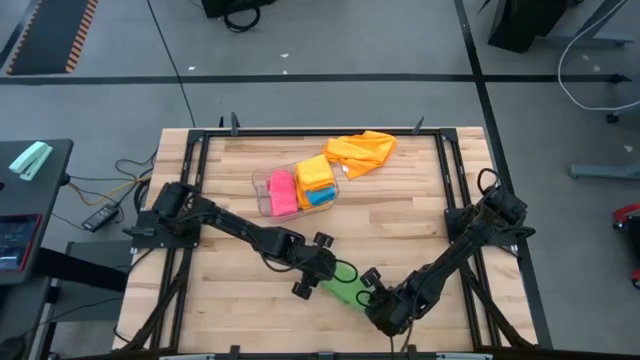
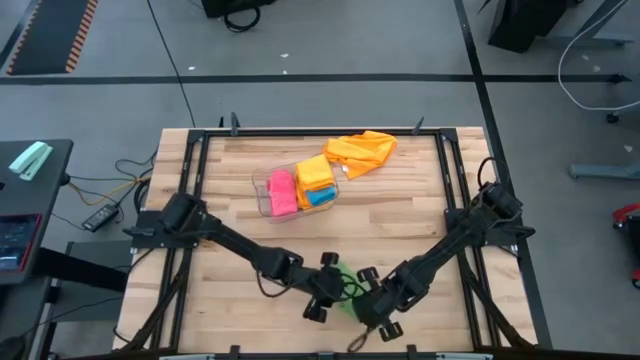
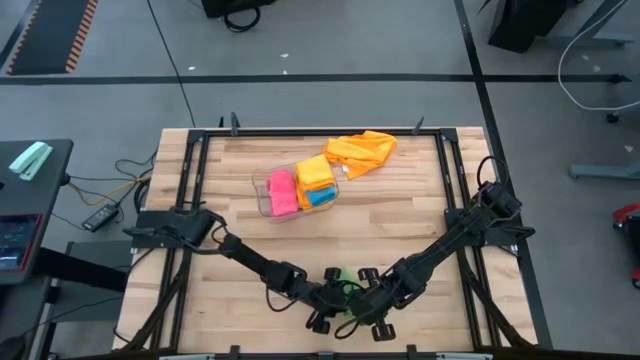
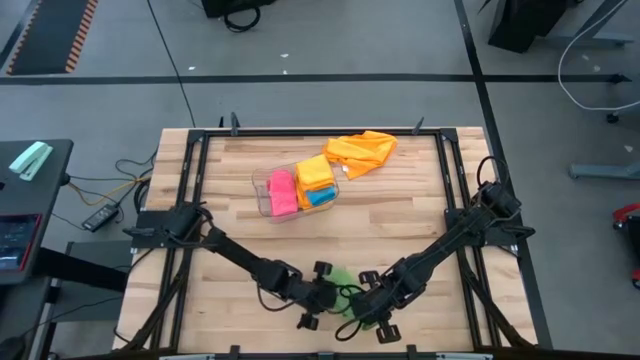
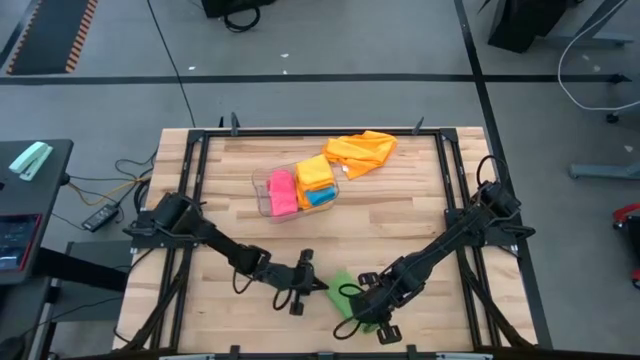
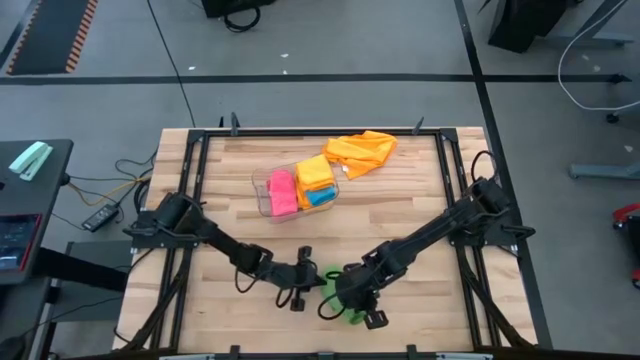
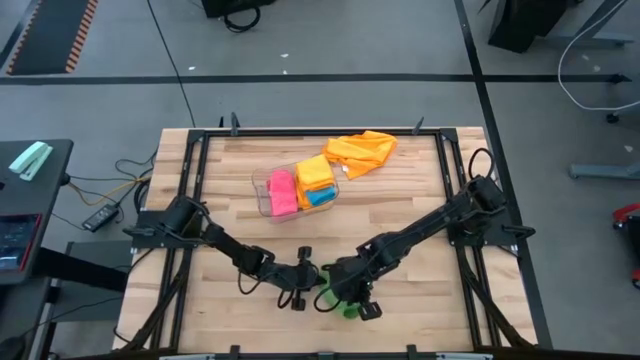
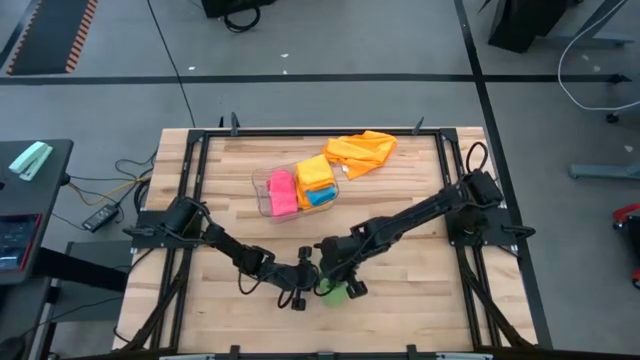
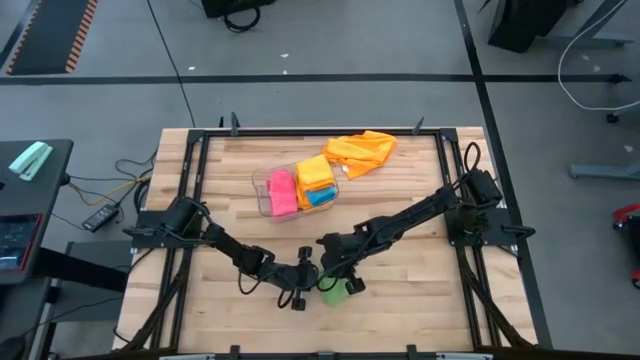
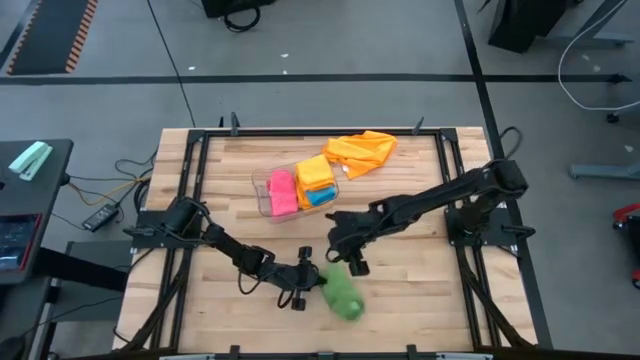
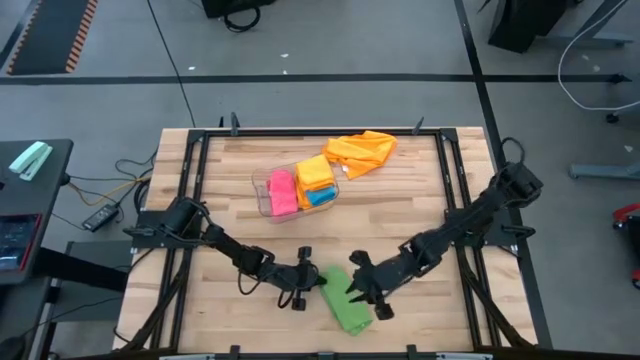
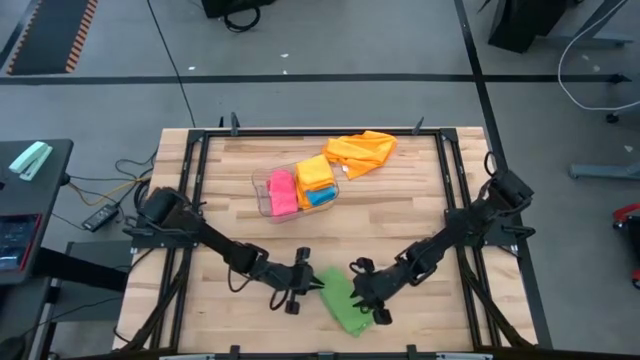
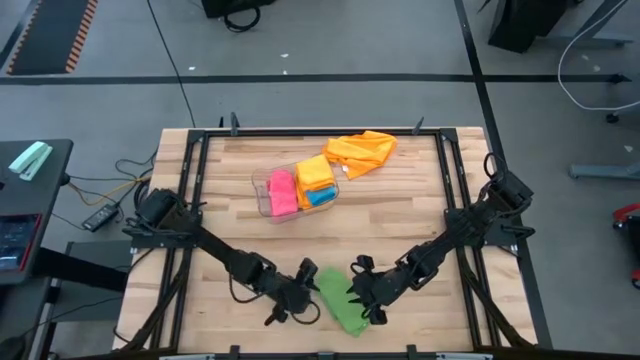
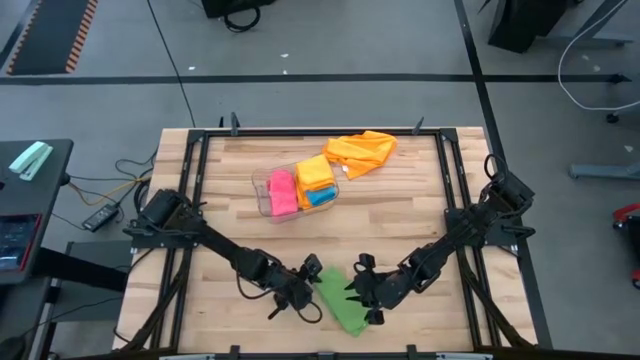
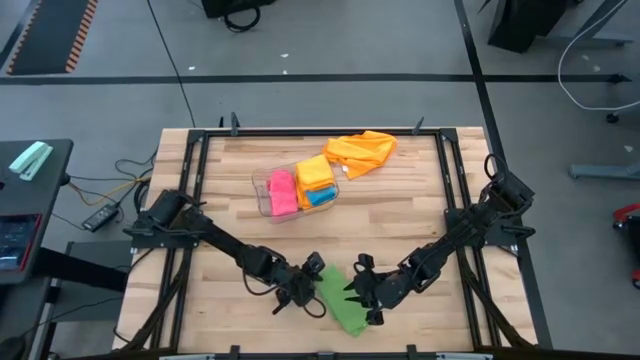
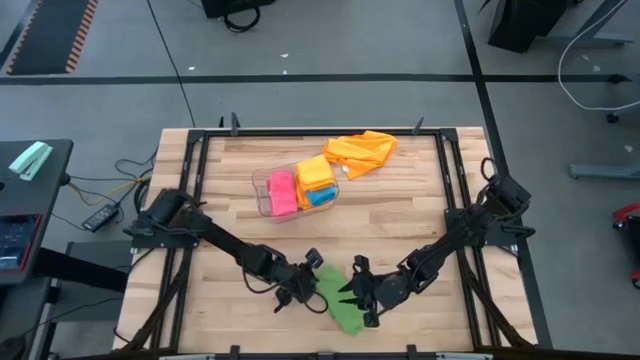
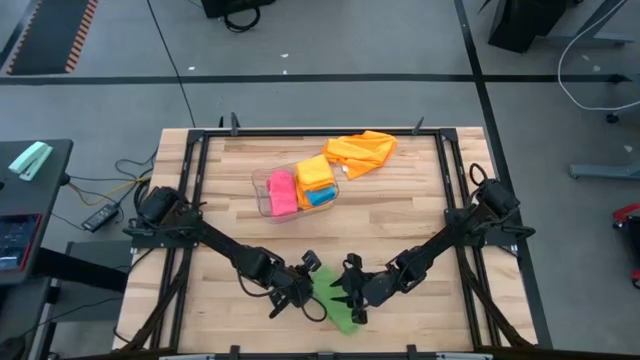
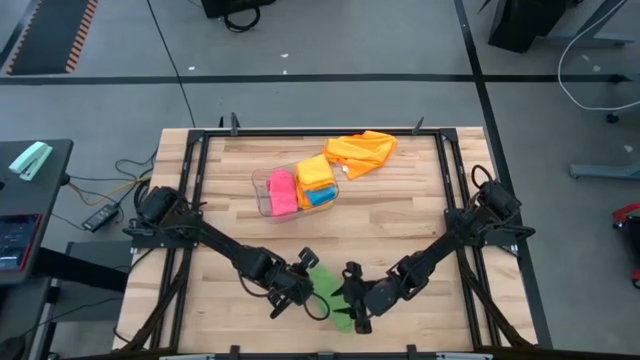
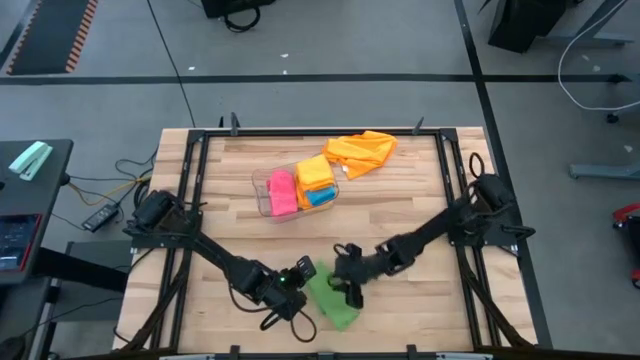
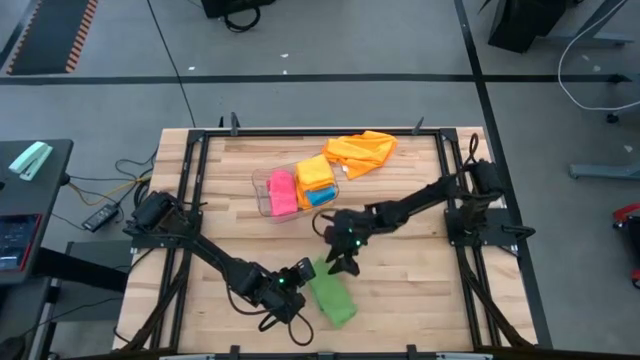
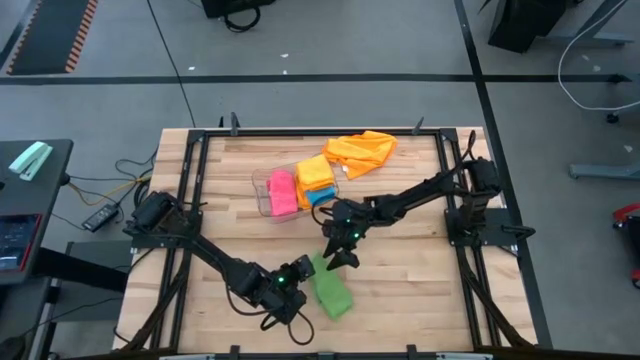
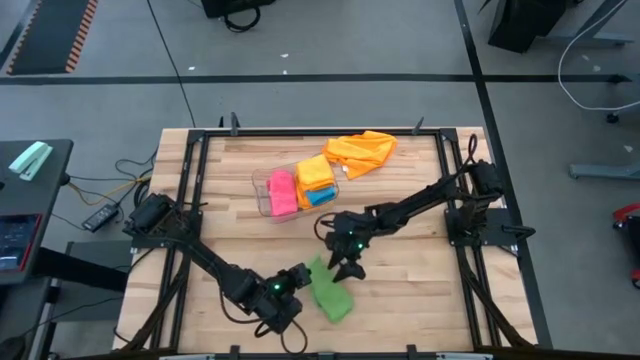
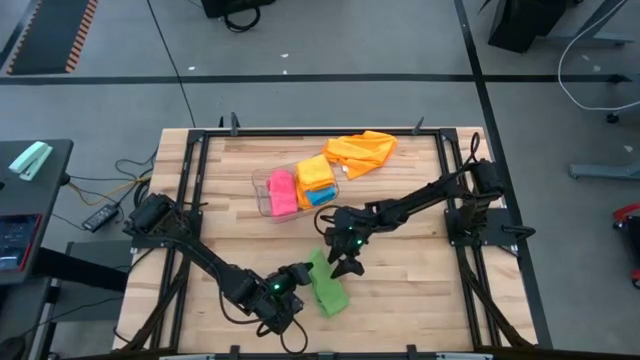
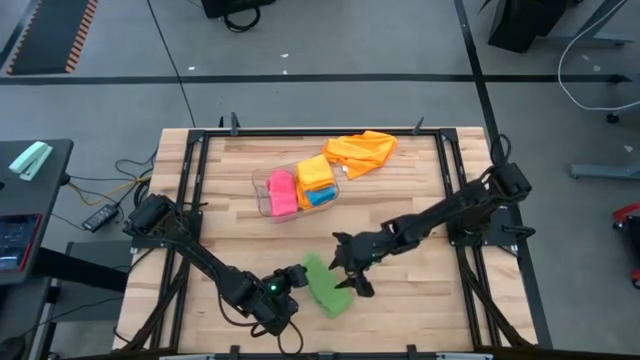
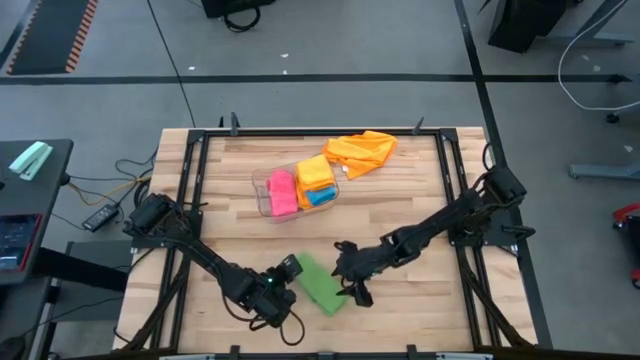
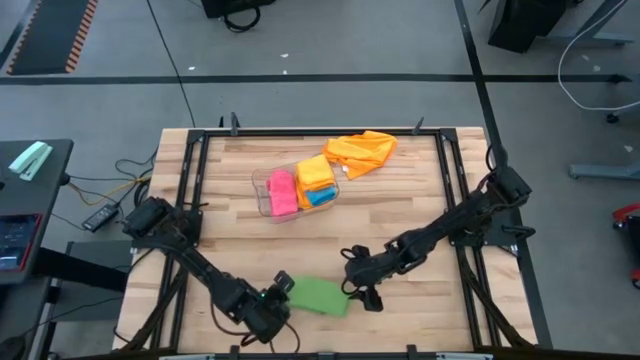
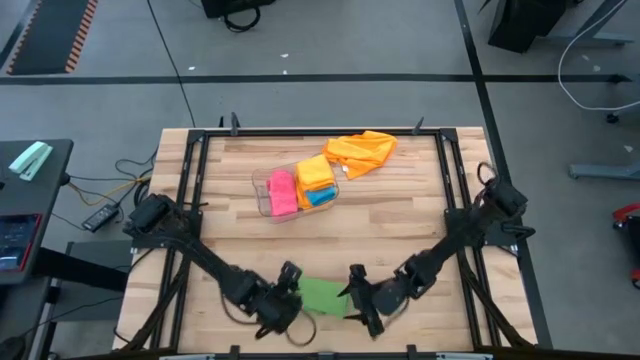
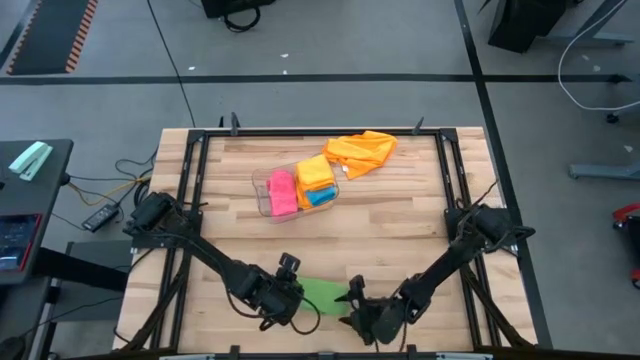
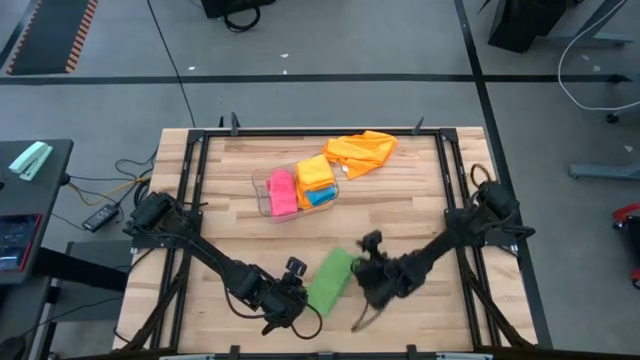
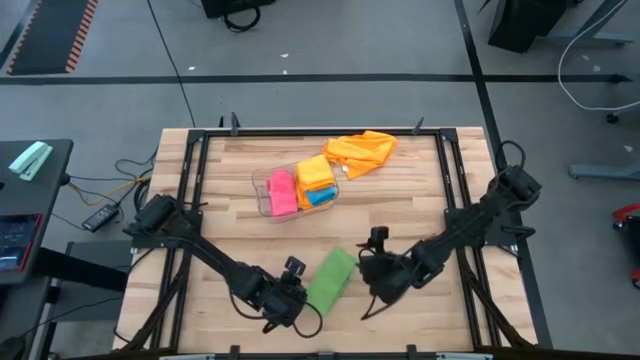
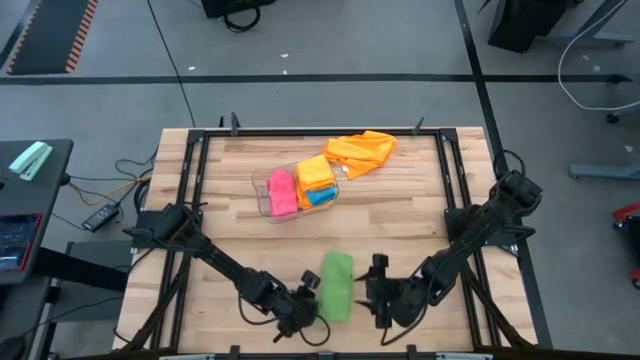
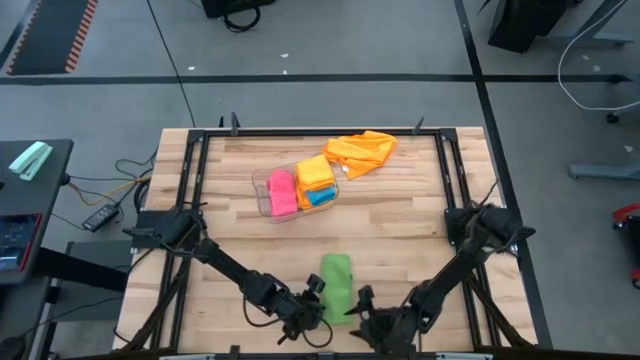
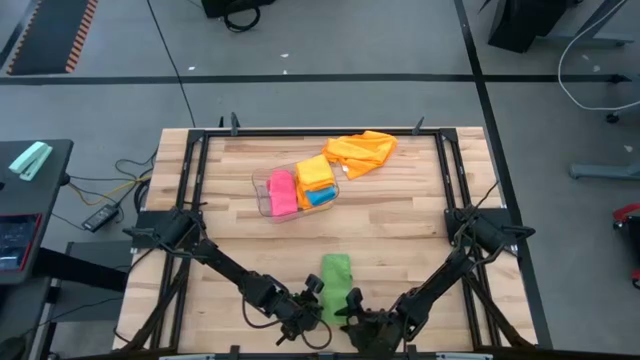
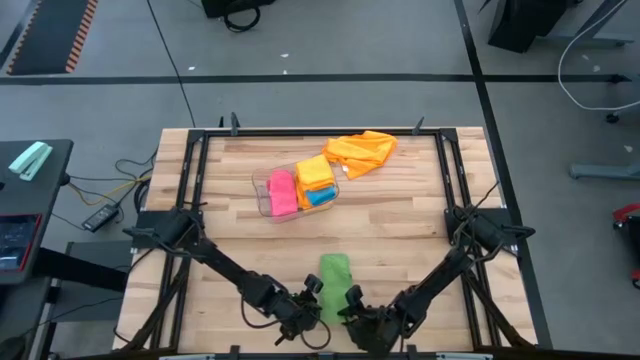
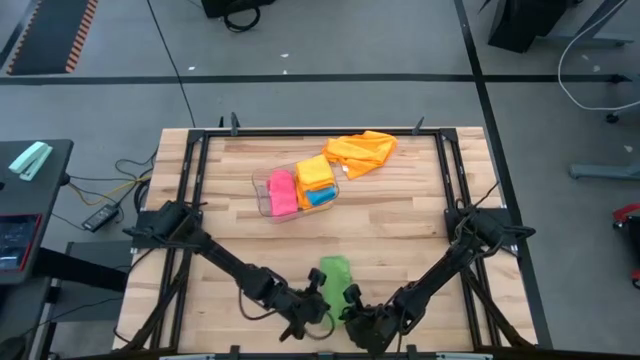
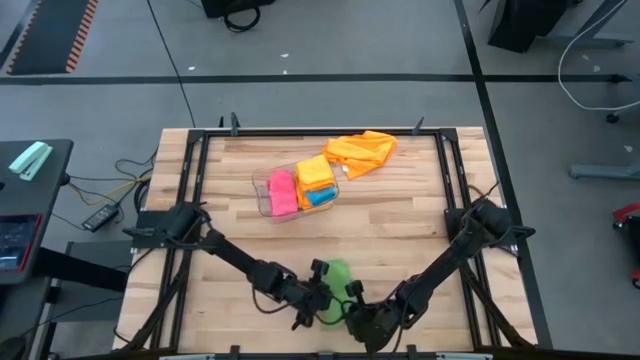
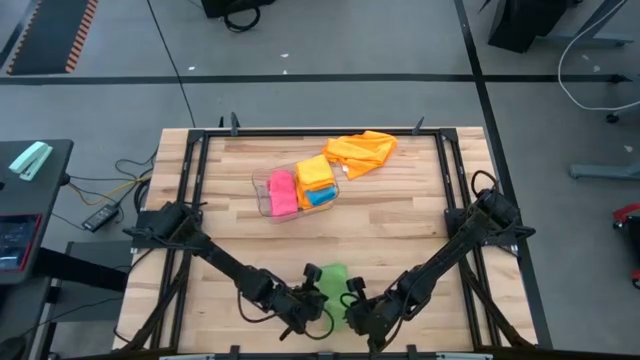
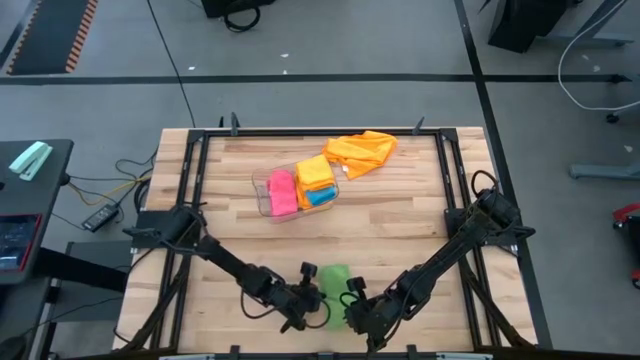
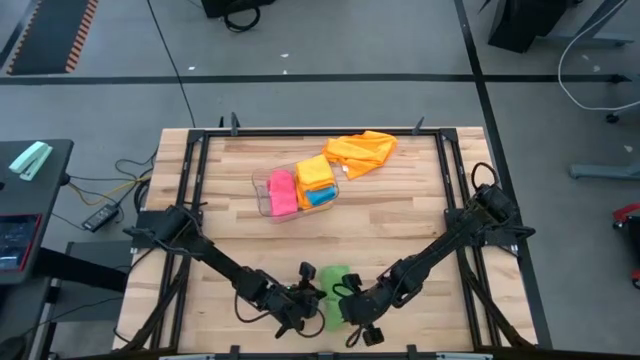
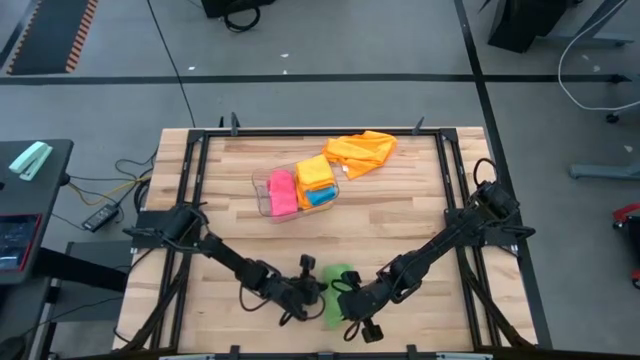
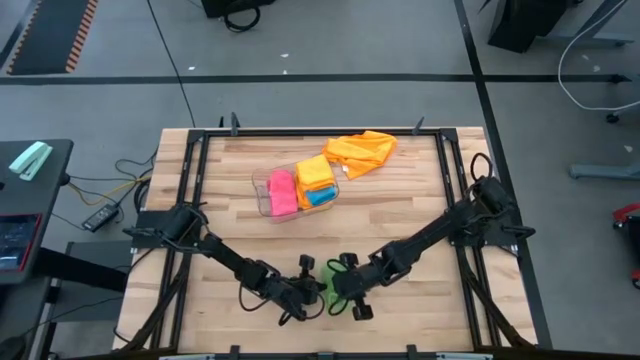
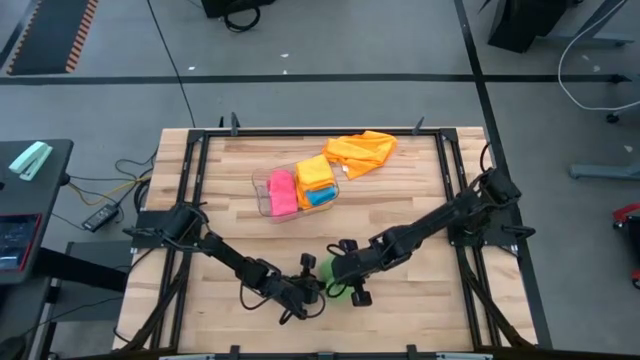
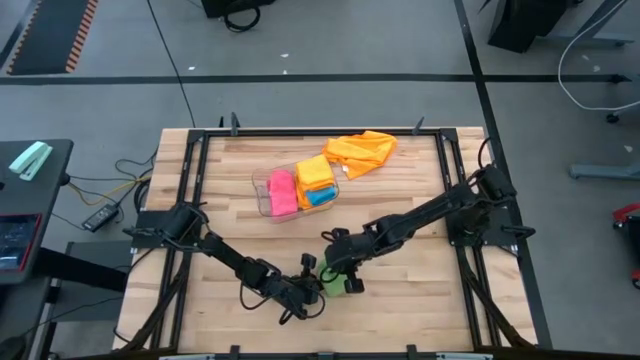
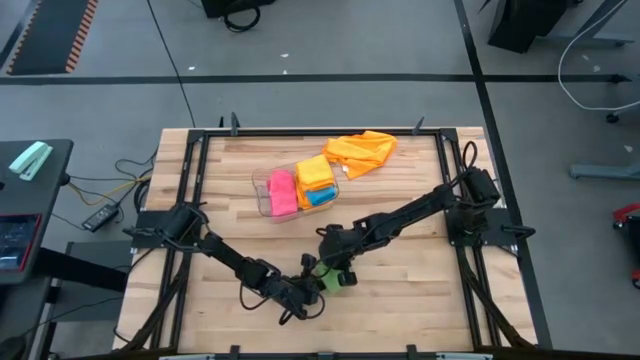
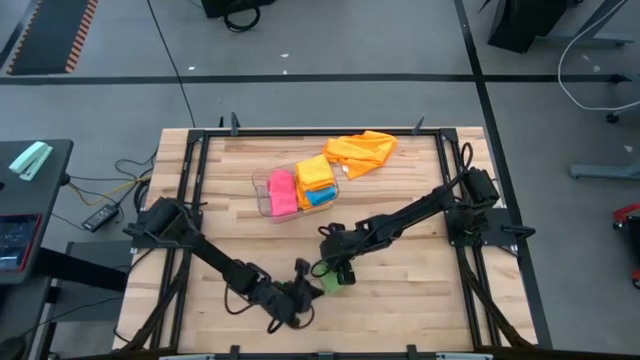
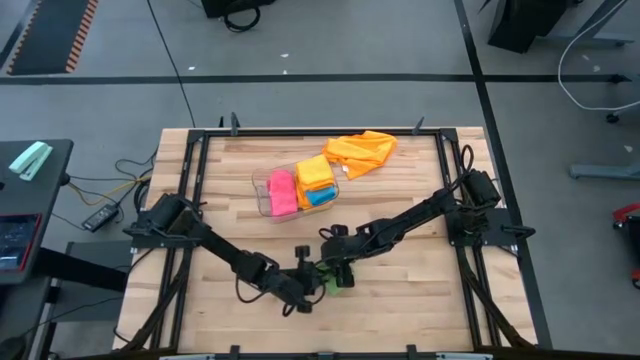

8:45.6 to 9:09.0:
Task: Fold microfiber towels
Fold the green microfiber cloth
